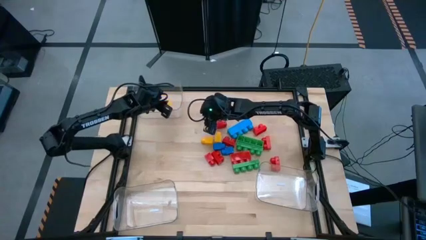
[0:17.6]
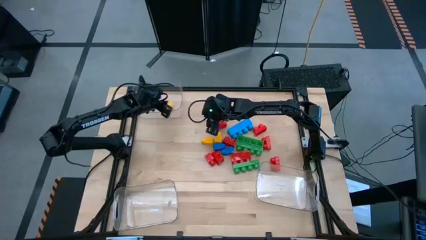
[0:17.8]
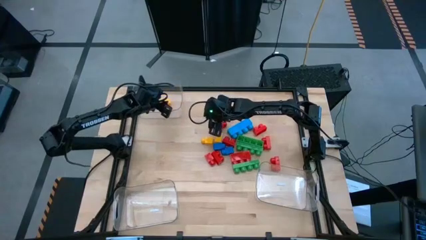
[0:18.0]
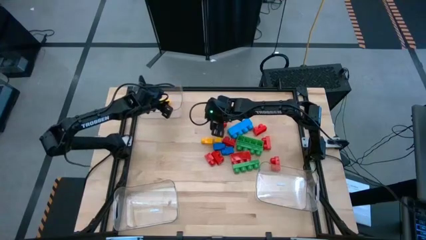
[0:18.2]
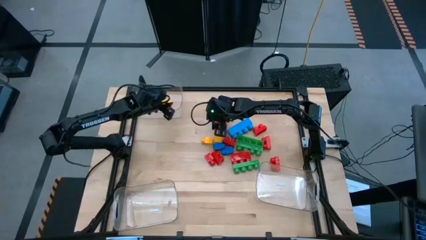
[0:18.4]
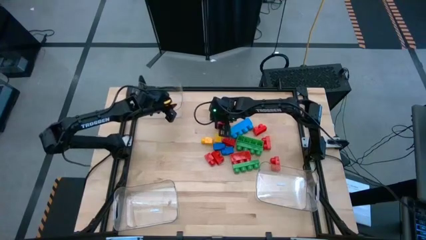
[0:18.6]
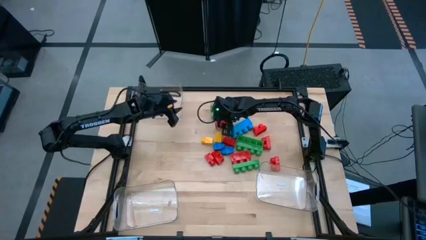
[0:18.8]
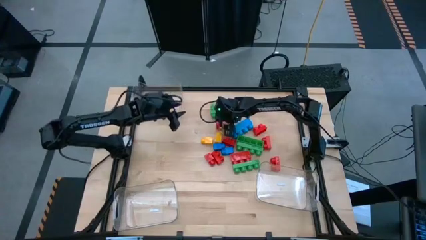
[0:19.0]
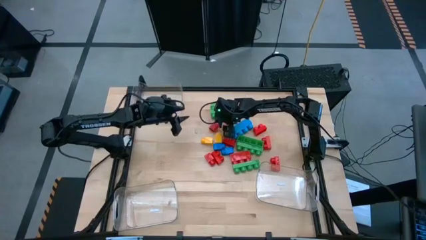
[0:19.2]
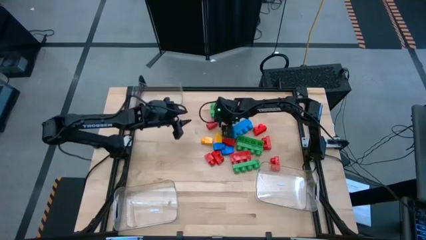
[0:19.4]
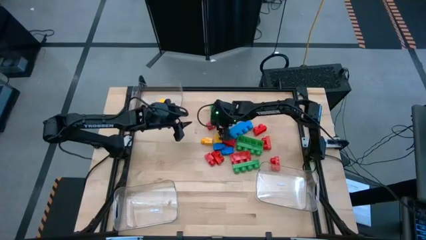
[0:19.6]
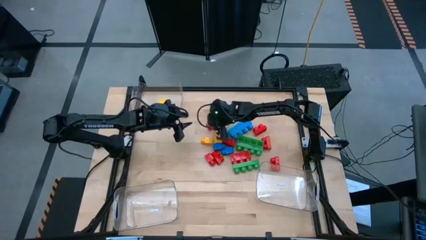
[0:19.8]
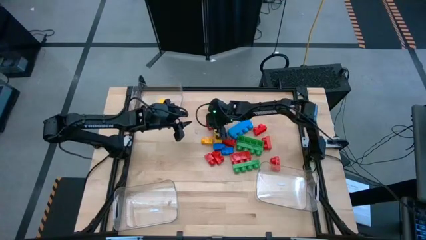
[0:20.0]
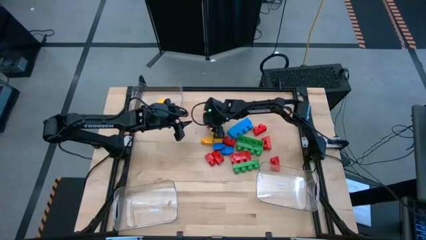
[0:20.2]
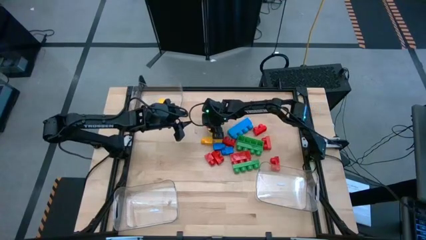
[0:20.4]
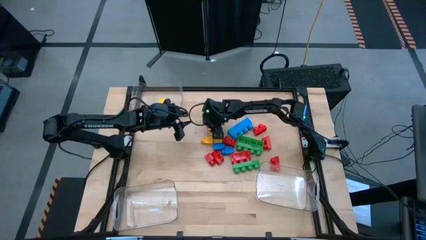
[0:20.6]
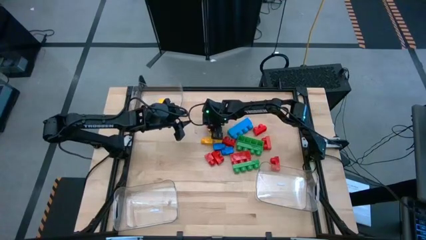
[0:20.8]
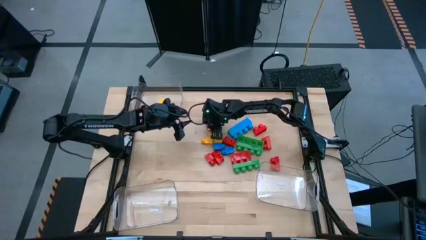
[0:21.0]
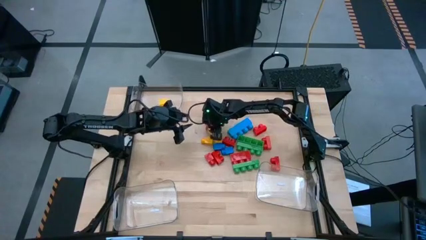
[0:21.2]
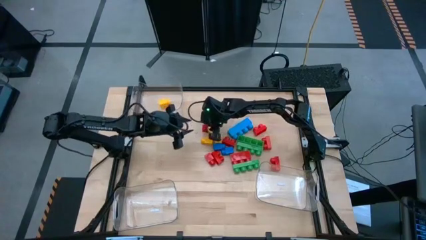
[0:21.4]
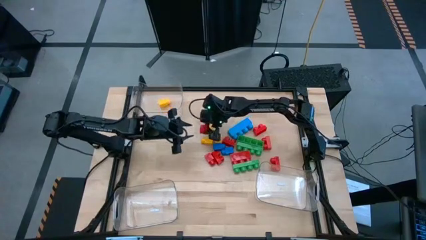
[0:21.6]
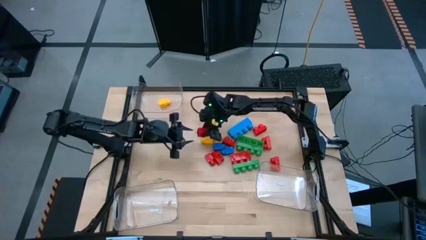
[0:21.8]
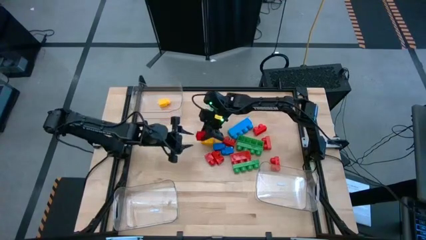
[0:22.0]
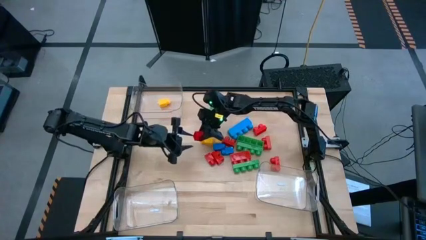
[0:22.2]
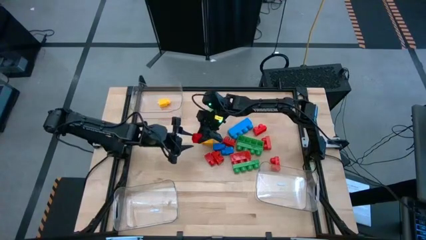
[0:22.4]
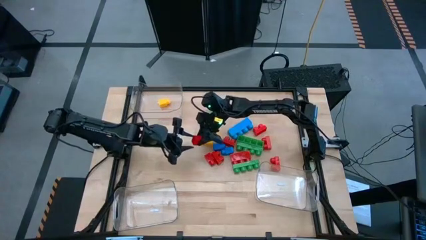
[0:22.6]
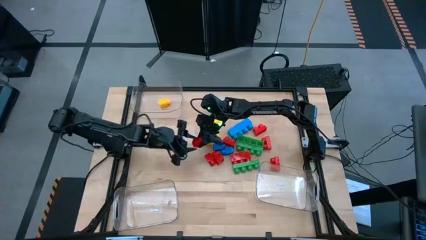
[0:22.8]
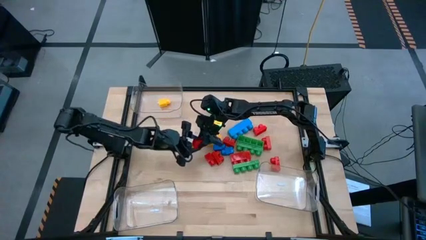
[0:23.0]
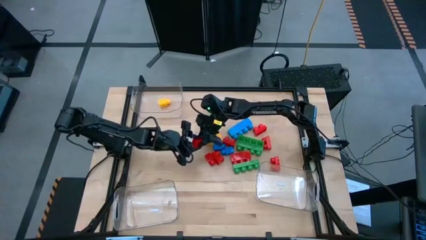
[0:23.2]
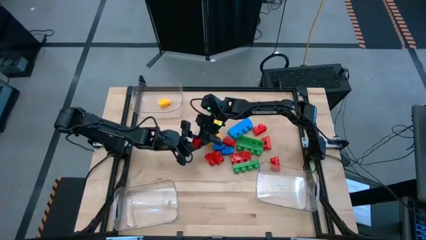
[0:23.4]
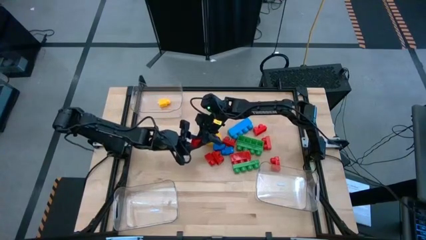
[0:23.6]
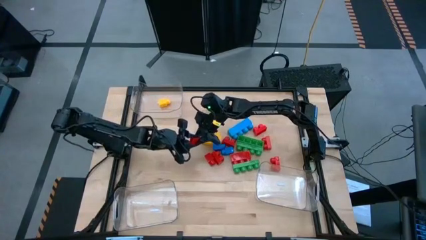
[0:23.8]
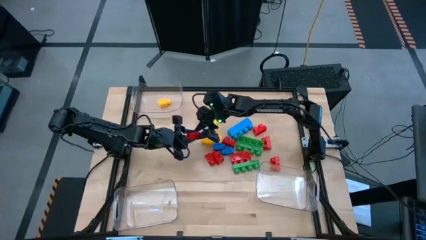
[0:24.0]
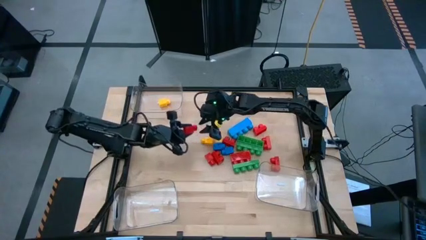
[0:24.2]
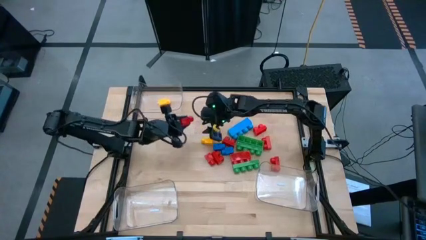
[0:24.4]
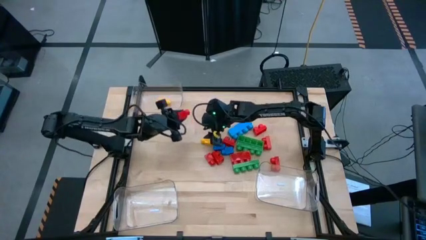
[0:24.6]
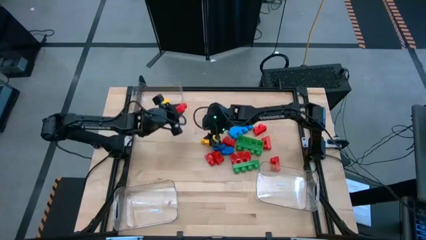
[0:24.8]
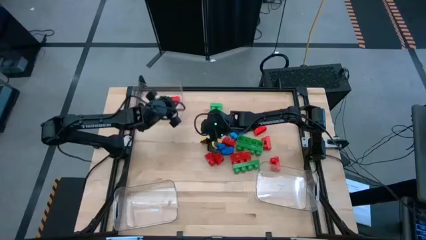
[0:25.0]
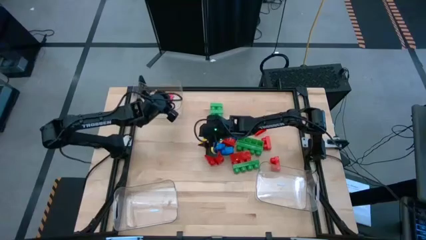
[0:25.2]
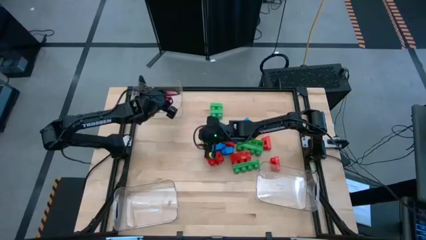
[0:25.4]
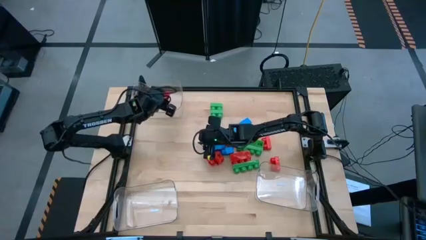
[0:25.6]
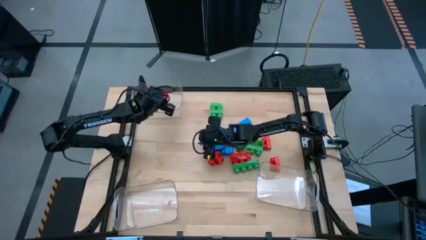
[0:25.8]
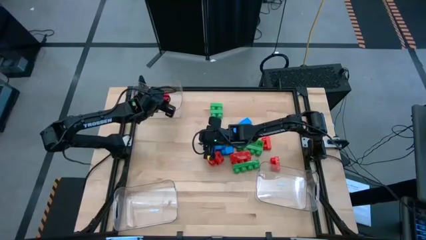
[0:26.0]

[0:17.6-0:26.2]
Task: Sort blocks by size
Put the one-stud red game piece into the top transparent bin

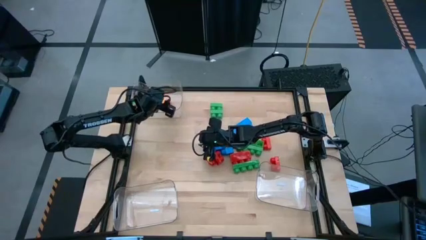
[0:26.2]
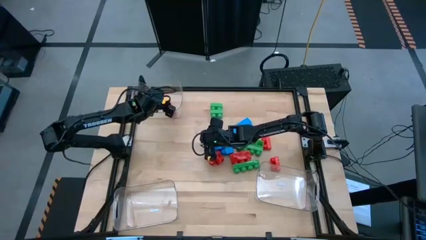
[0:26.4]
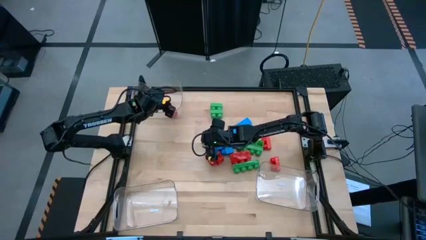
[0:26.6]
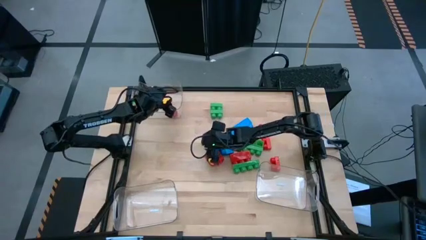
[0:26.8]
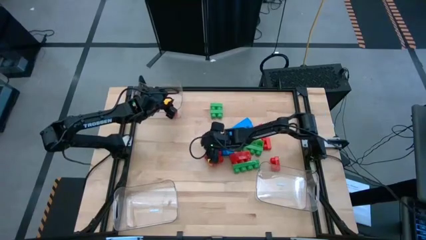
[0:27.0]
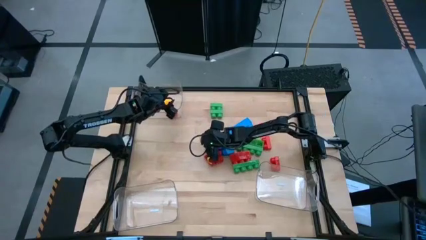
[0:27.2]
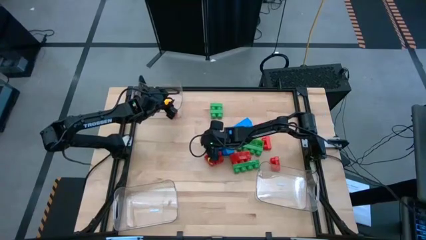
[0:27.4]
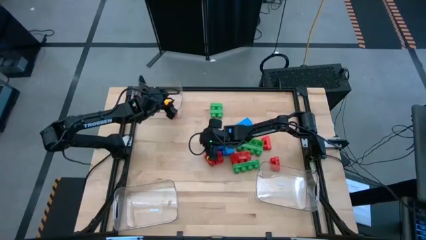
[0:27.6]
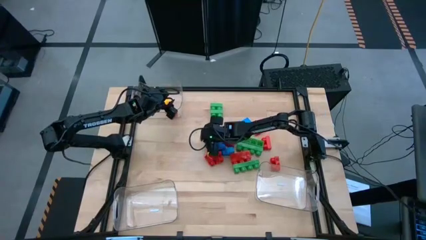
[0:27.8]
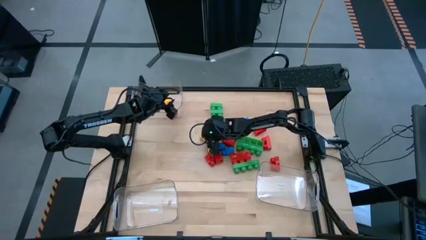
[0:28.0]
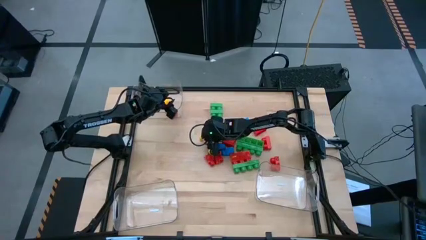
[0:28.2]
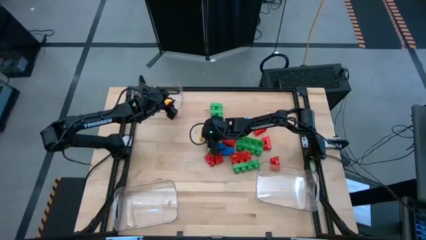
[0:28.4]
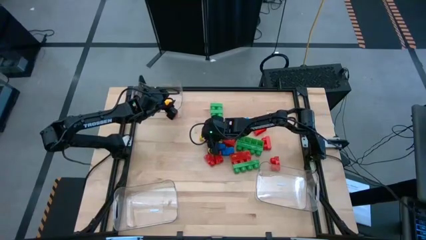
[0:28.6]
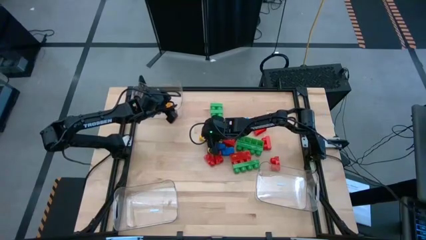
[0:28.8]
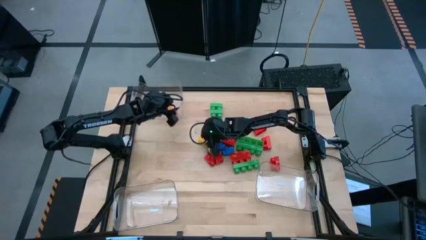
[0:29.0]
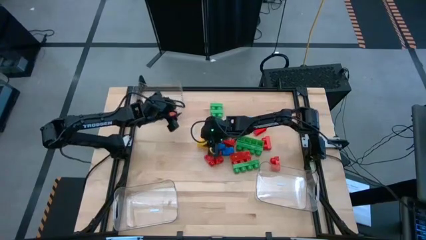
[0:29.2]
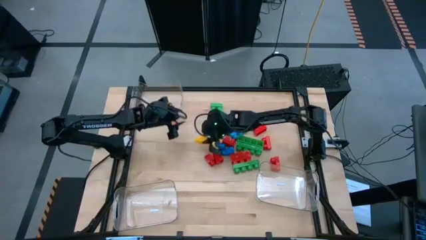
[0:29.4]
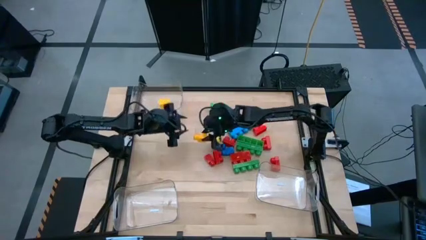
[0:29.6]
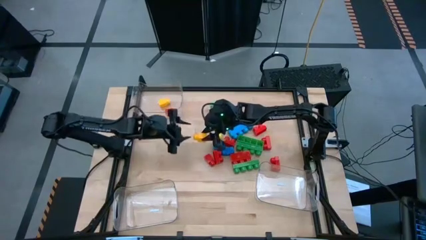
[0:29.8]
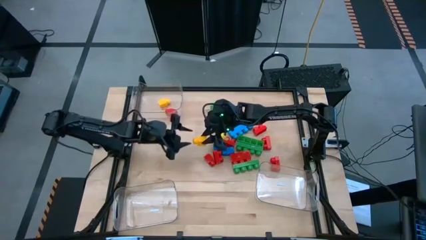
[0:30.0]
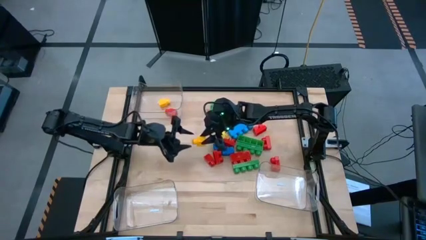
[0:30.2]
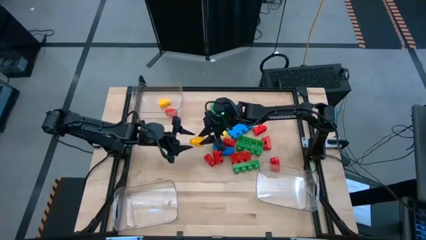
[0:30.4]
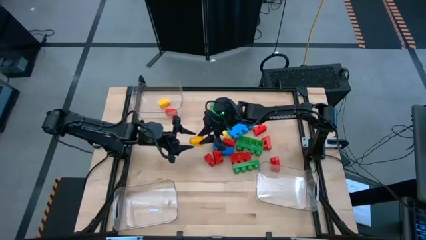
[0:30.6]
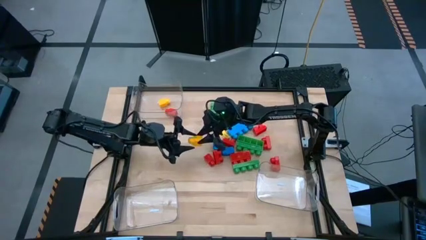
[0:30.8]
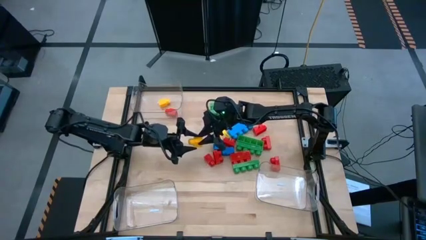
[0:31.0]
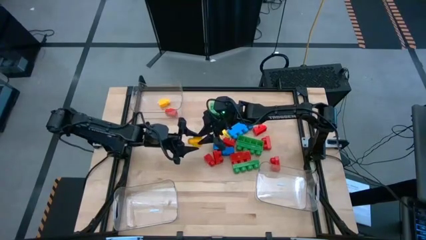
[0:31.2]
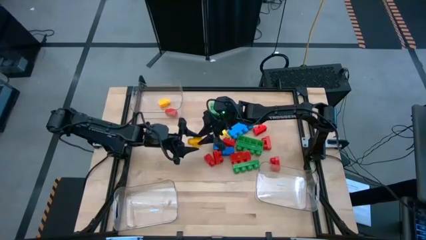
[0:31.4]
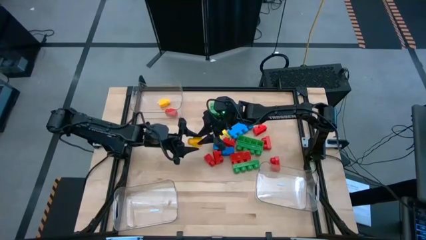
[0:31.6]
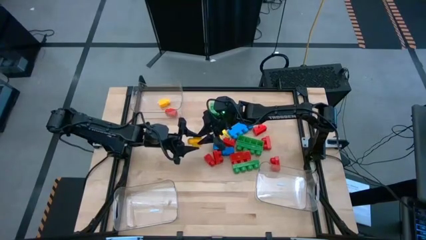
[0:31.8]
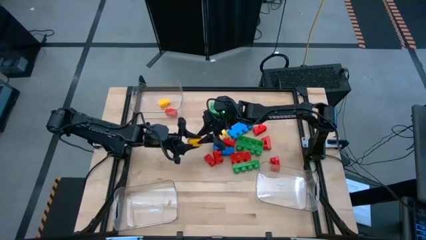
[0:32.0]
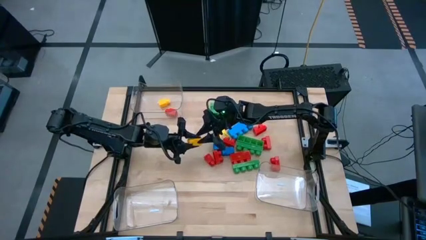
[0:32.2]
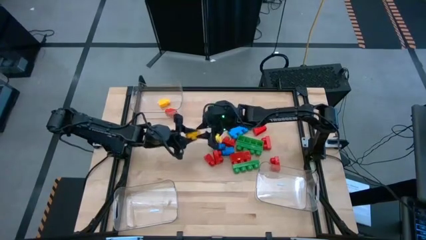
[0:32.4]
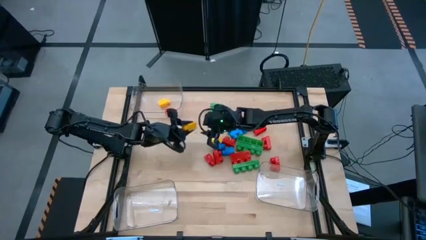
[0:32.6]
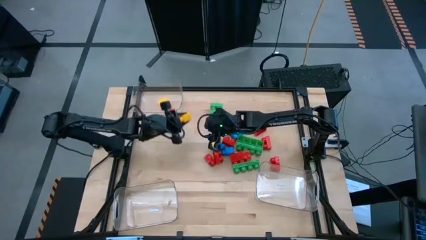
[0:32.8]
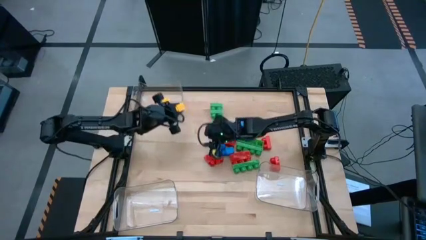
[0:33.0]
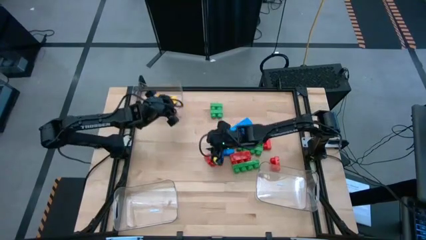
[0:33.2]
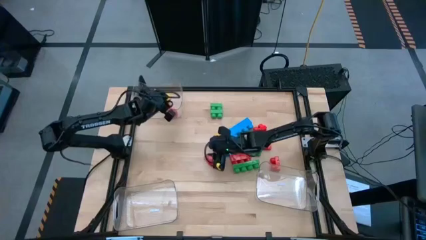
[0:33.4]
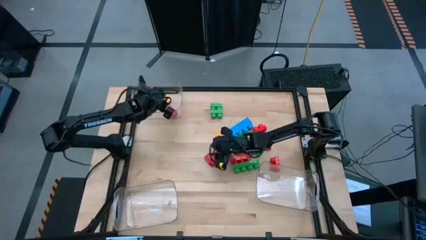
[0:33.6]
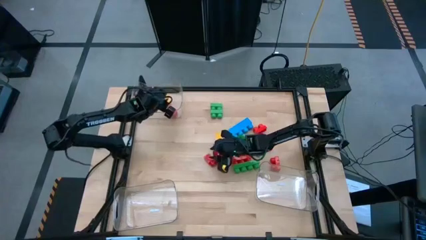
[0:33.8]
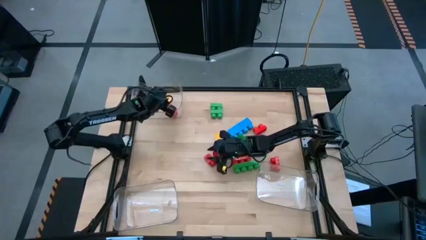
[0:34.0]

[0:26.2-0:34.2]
Put the one-stud yellow game piece into the top transparent bin
